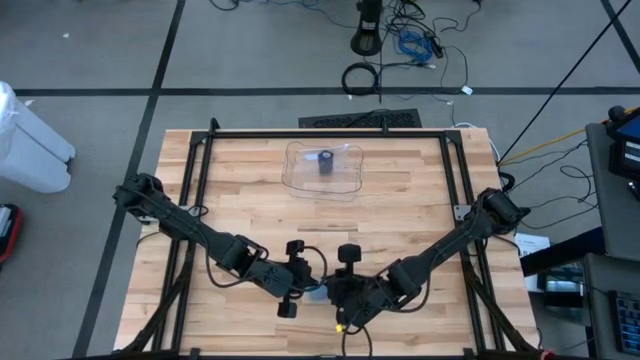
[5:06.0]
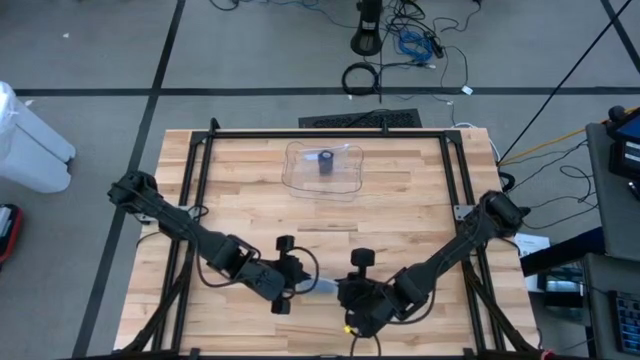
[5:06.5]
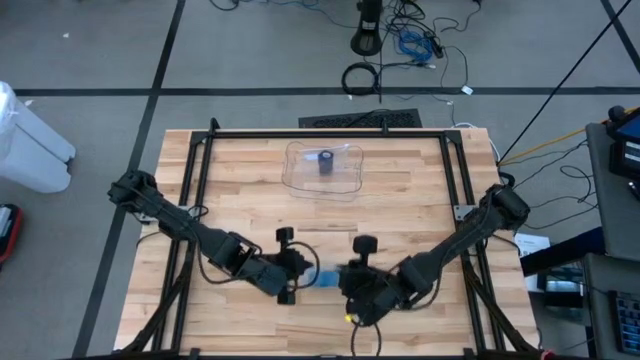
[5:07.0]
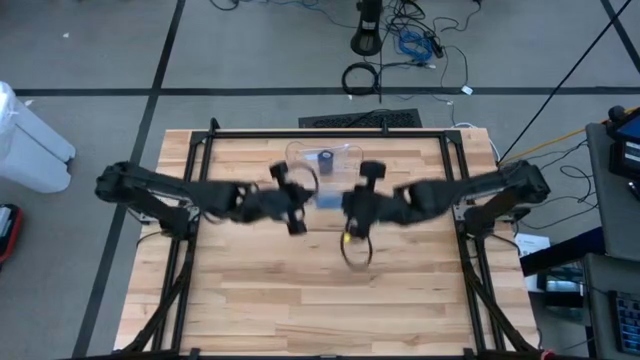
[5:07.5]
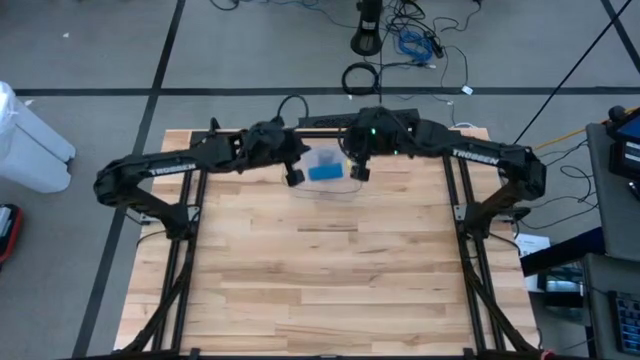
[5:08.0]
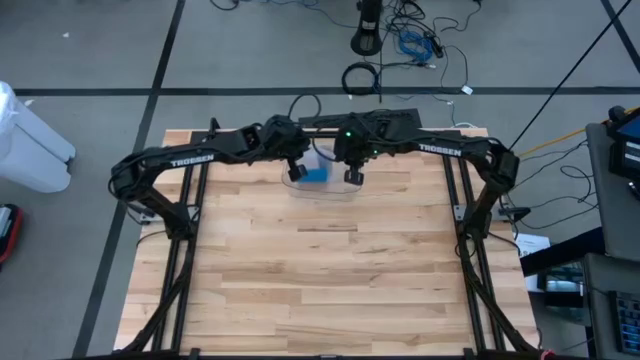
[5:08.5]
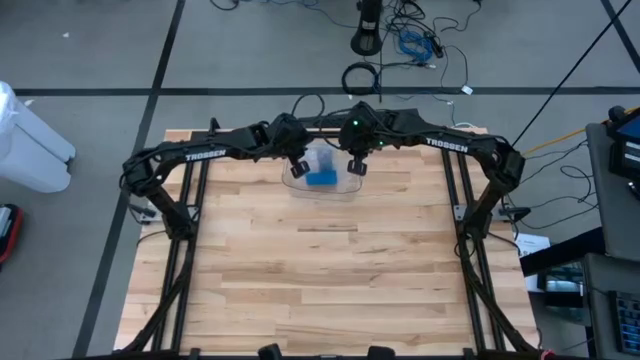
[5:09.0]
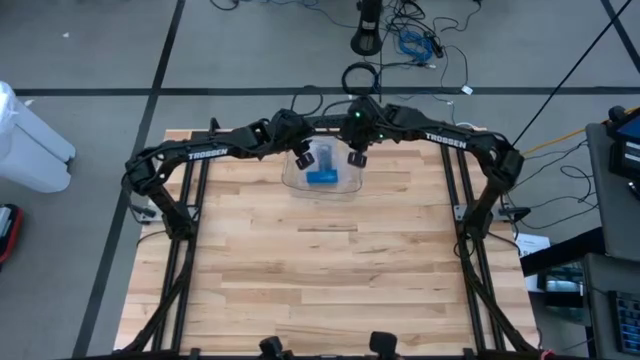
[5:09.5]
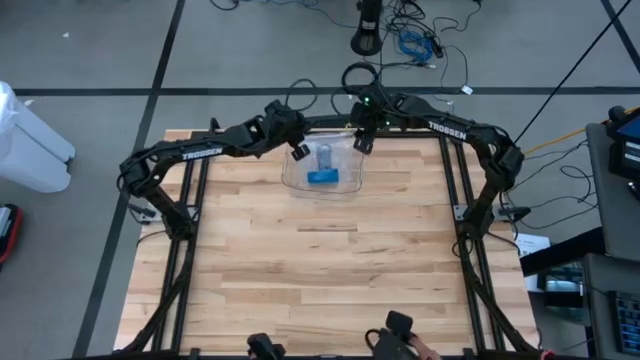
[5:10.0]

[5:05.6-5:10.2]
Task: Roll bandage
Put the transparent zip bag with the rolled blue bandage into the transparent bin

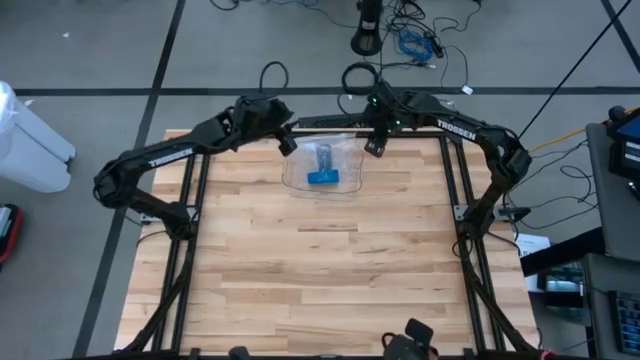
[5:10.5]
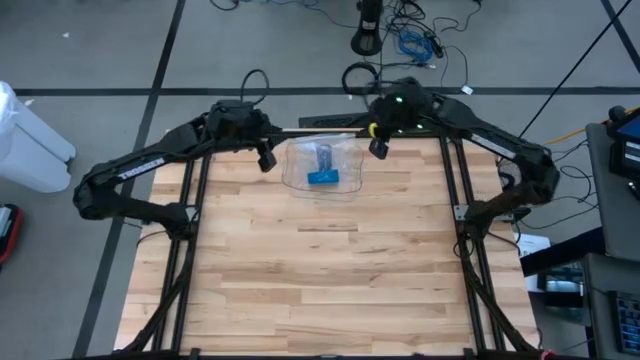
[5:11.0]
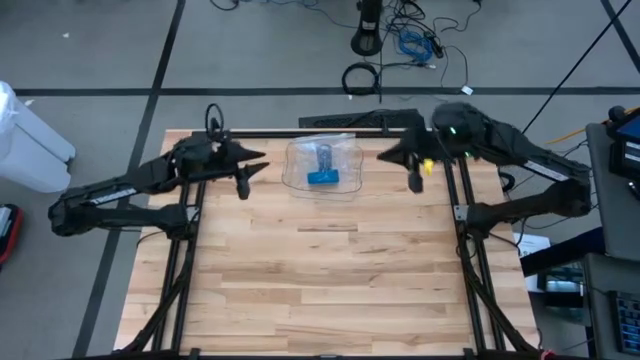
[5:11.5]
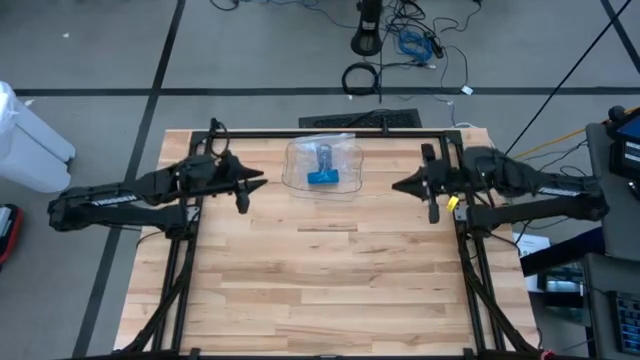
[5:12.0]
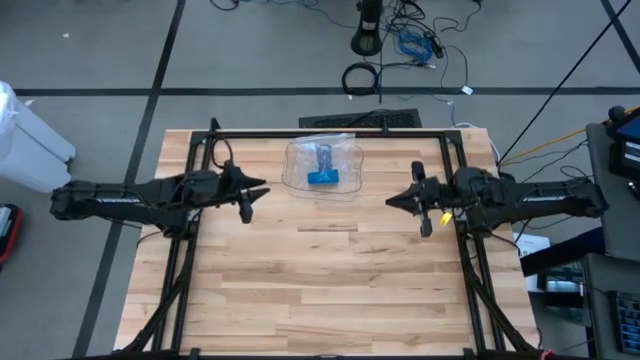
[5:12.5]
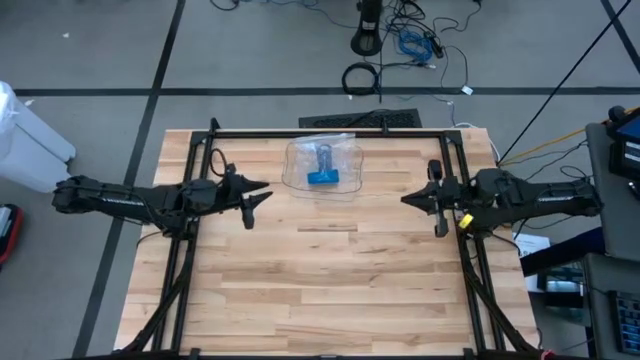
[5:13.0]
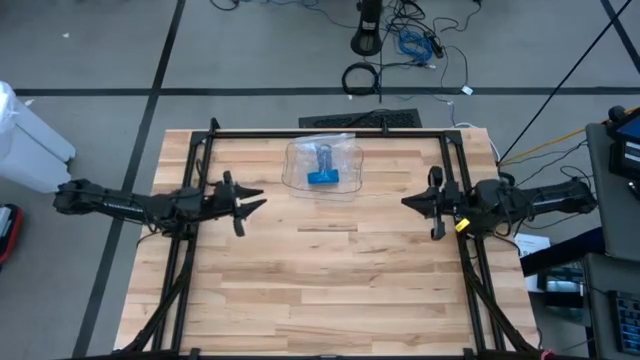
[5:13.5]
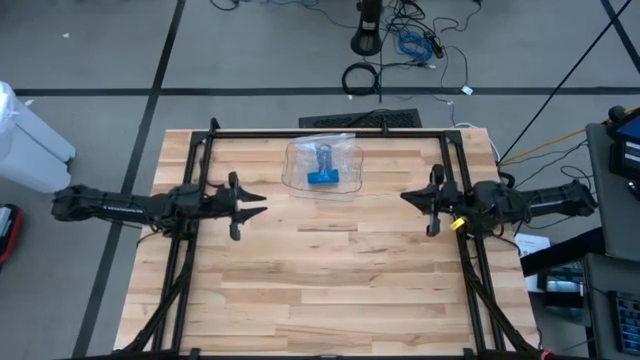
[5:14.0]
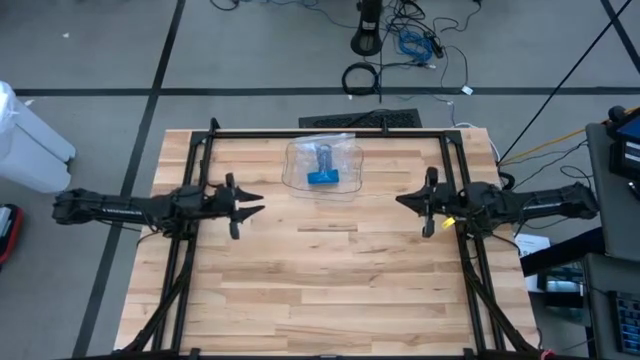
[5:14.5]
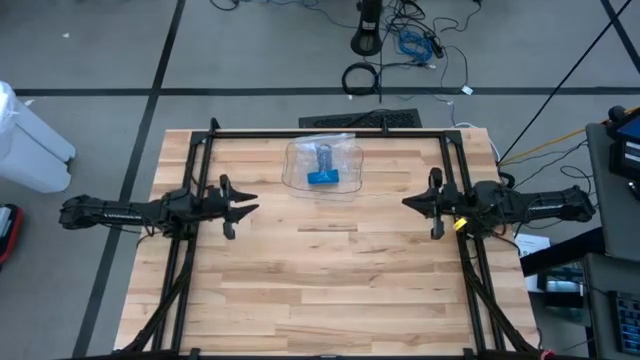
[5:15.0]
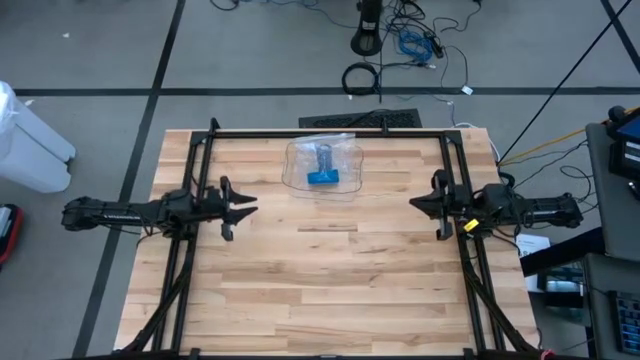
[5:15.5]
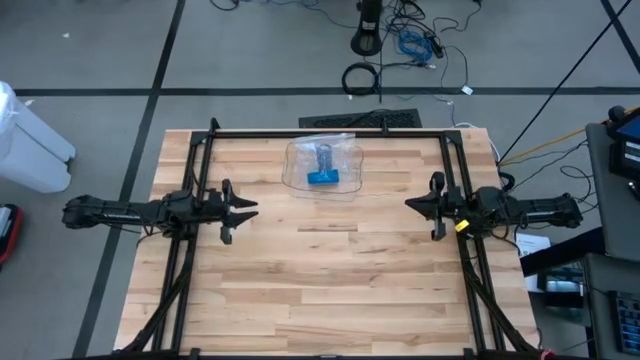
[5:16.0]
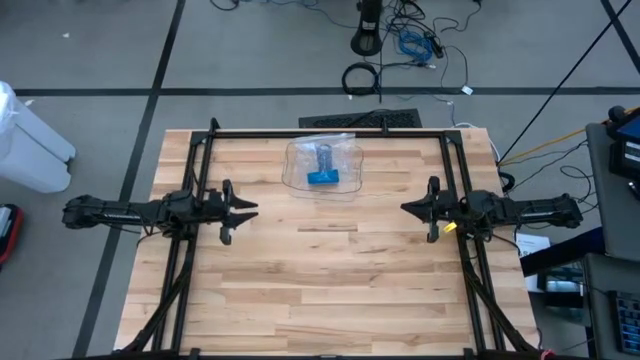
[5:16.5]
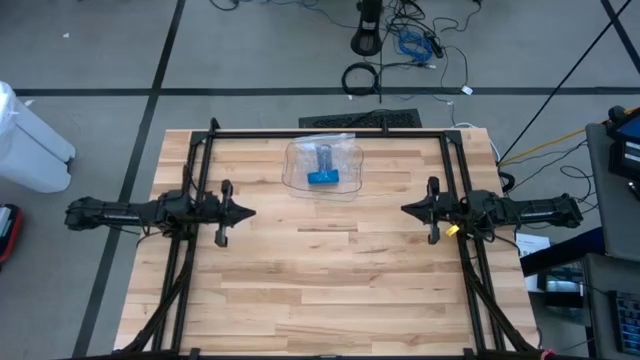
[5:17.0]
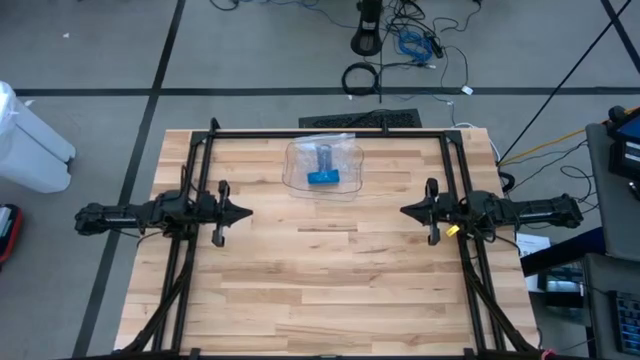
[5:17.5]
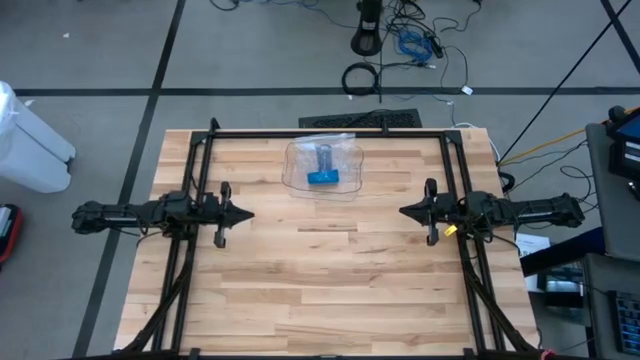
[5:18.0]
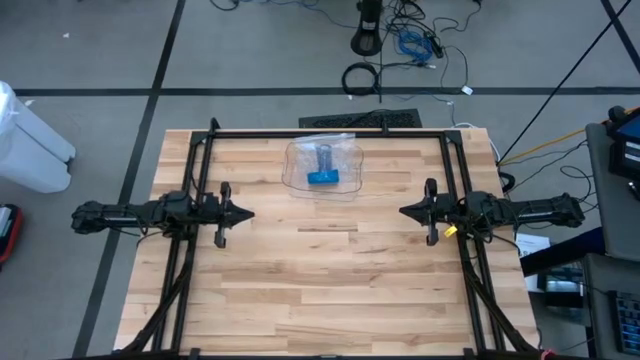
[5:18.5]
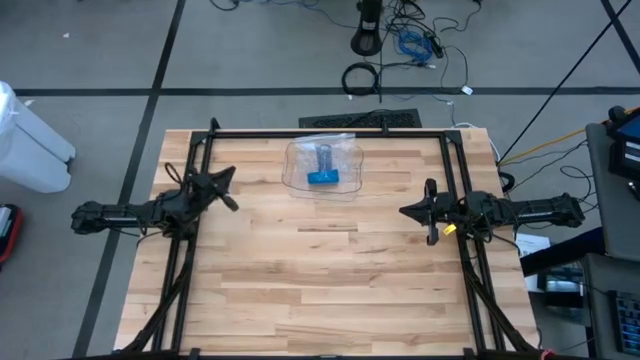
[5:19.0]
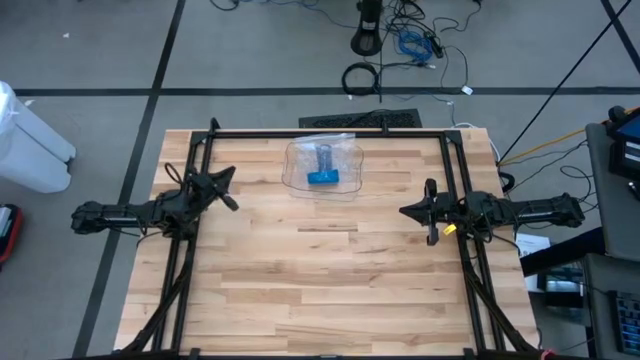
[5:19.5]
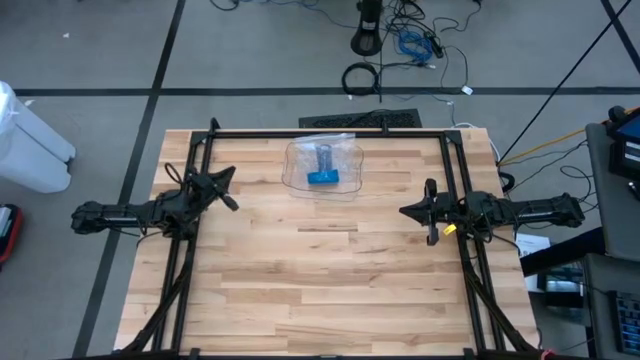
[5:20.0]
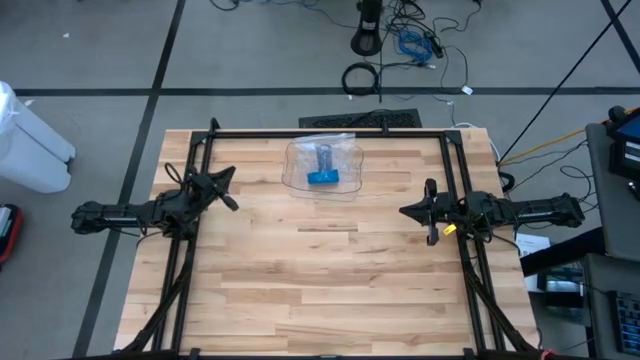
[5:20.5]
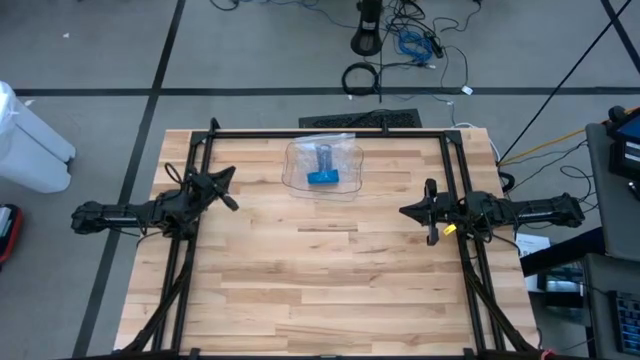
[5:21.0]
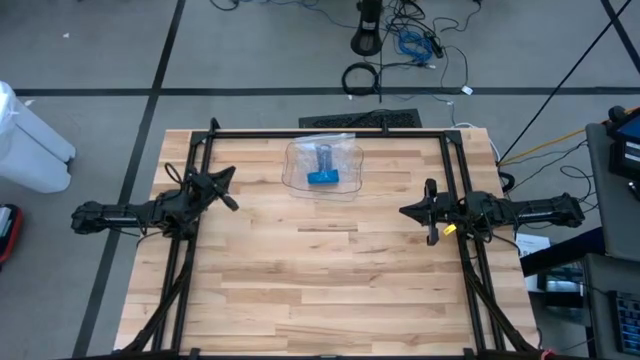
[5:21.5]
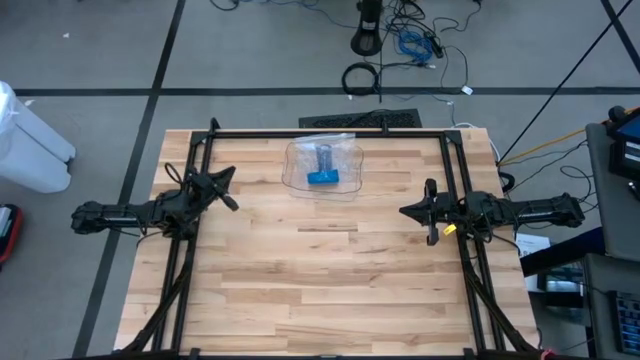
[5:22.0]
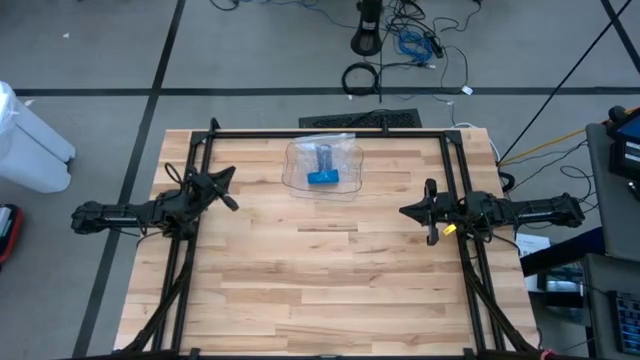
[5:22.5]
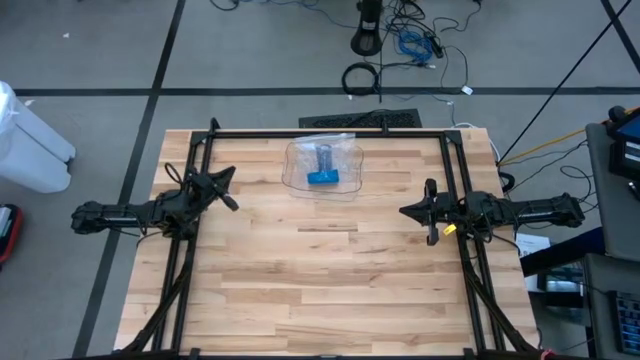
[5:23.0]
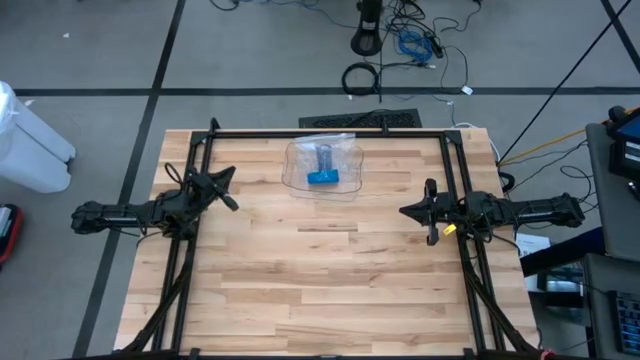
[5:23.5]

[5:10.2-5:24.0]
Return to Home Position

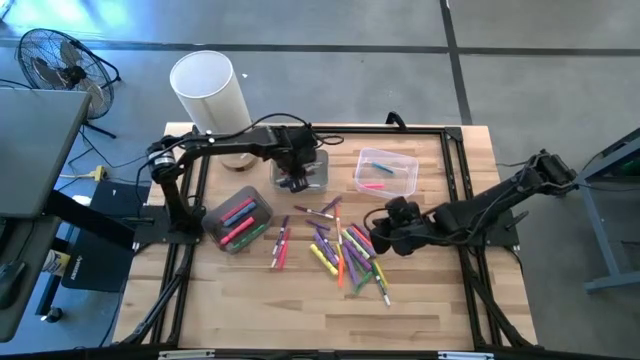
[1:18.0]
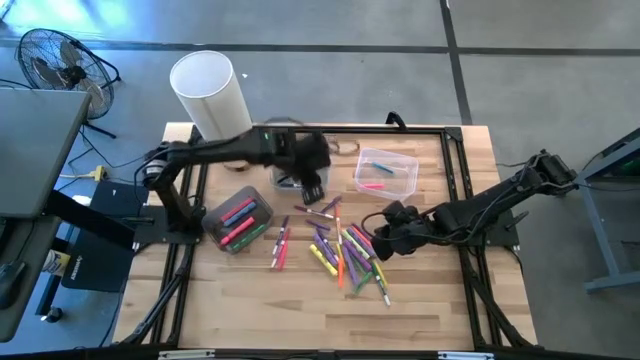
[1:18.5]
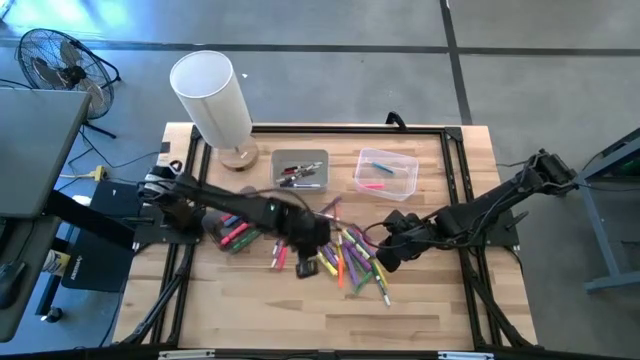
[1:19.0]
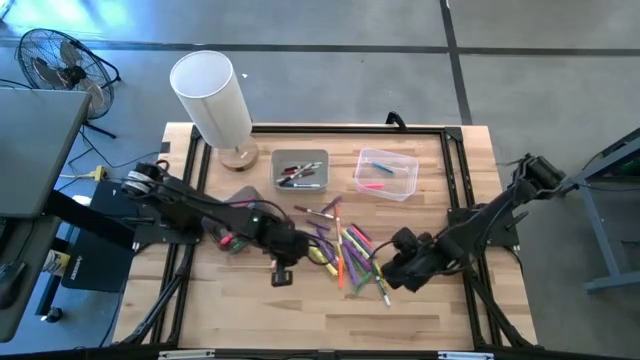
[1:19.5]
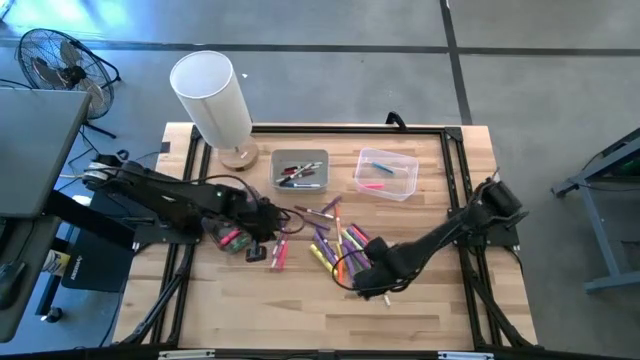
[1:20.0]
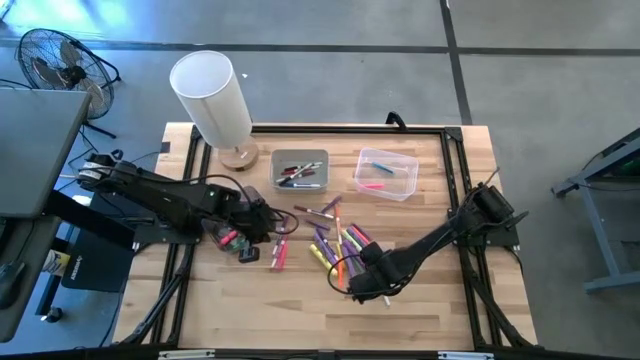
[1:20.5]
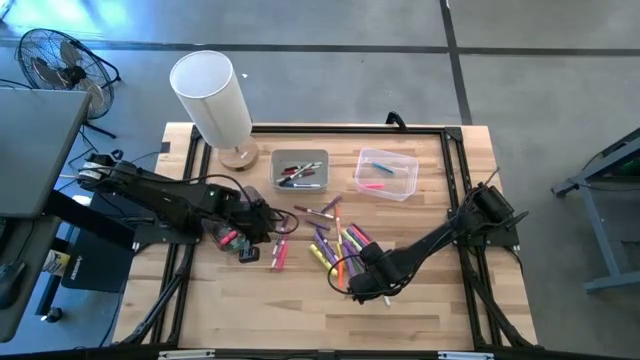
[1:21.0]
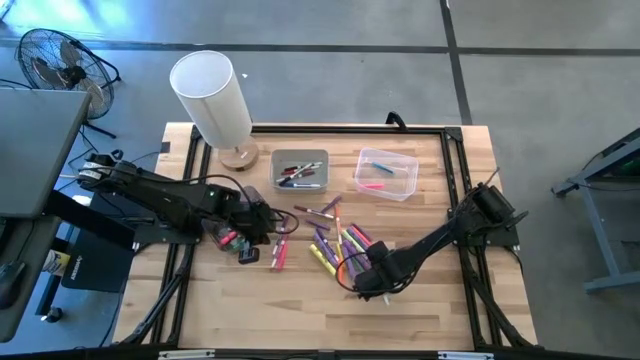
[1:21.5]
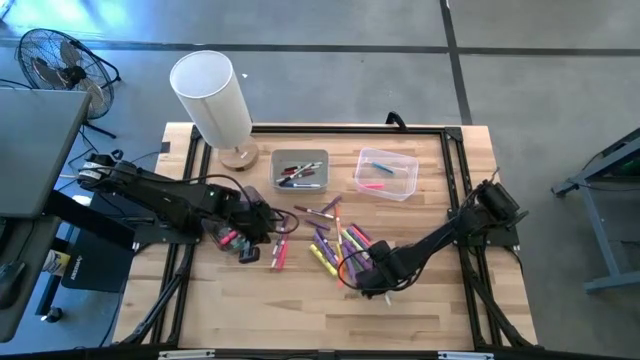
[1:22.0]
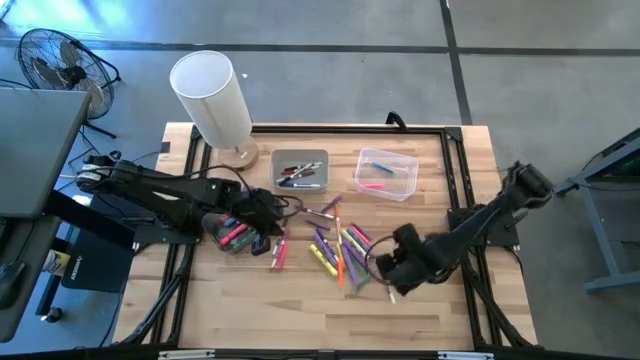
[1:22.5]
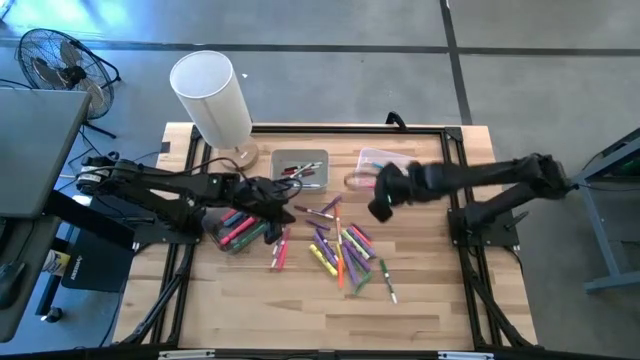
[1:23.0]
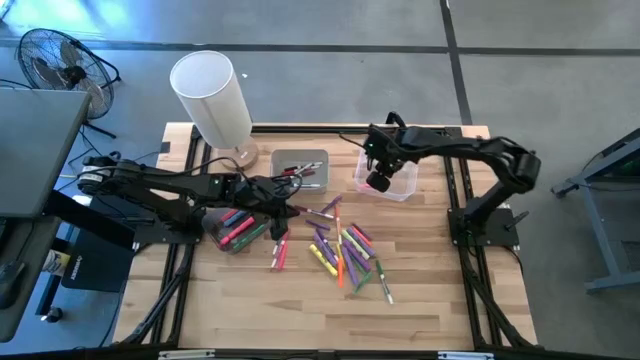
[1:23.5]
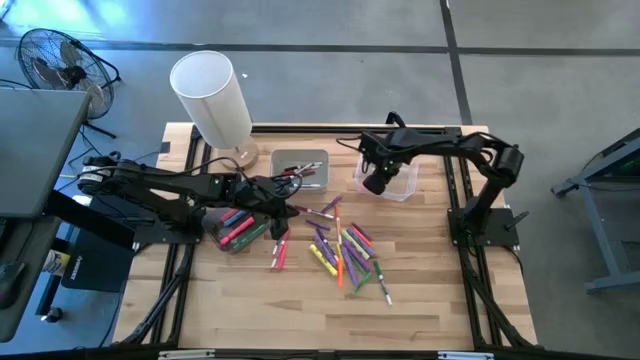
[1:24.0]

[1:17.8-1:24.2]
Task: Pick & Place Markers
Put the yellow pen into the transparent bin
